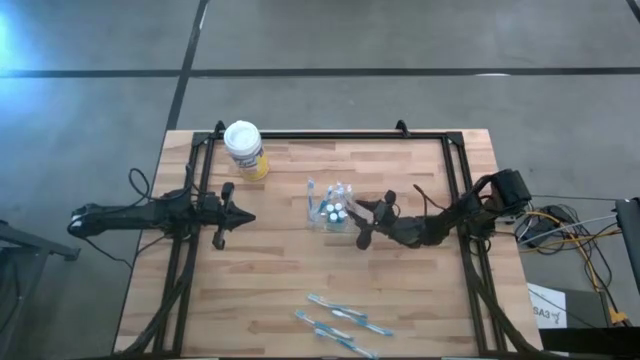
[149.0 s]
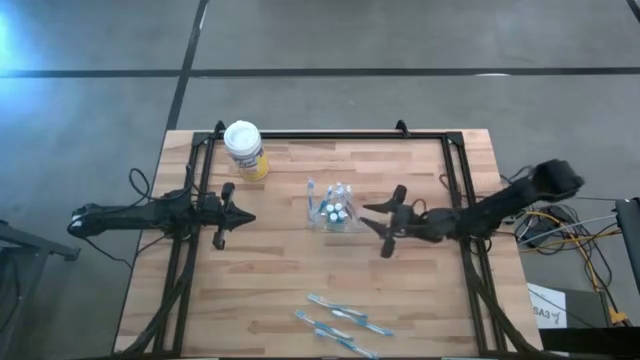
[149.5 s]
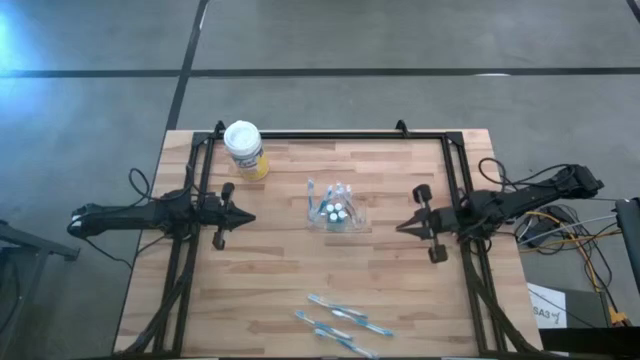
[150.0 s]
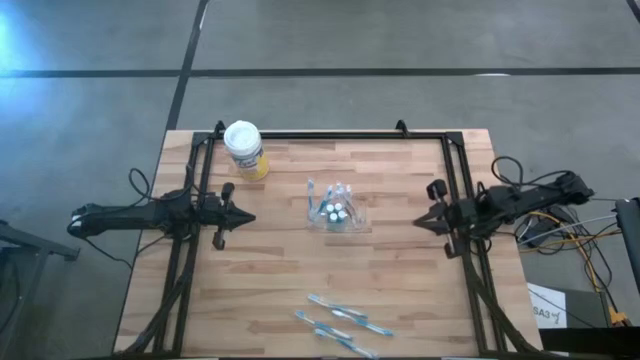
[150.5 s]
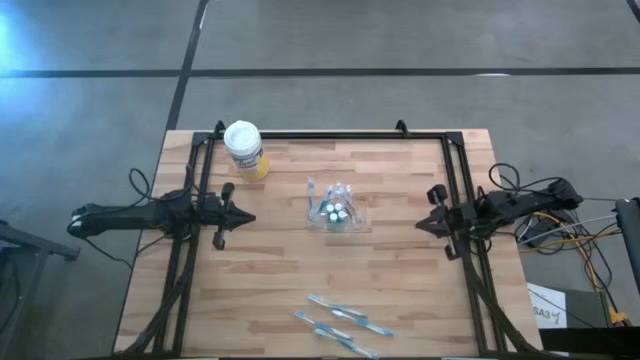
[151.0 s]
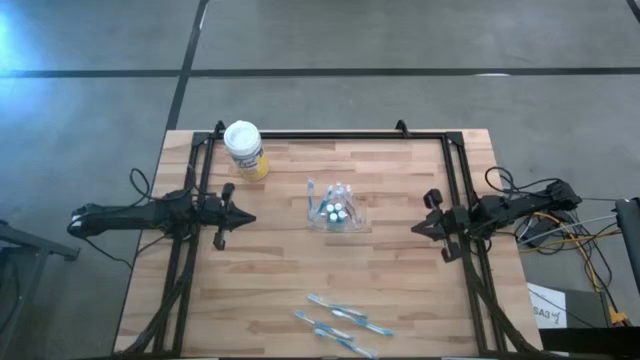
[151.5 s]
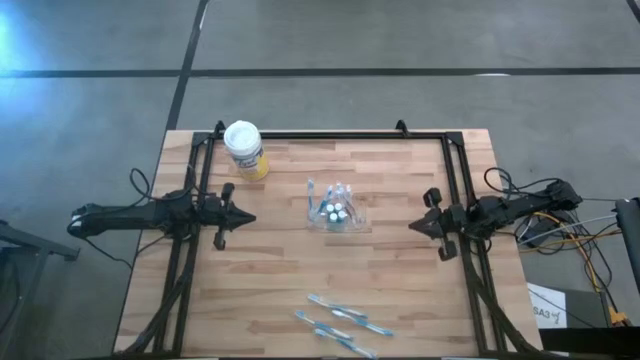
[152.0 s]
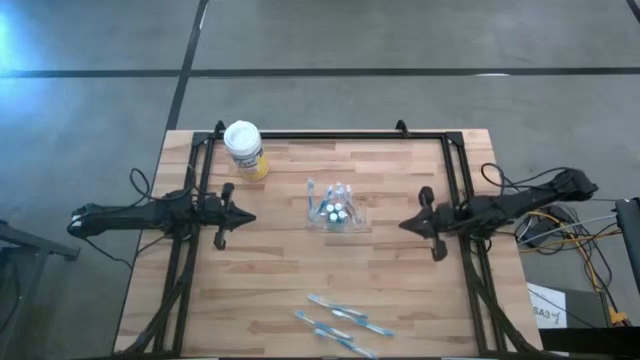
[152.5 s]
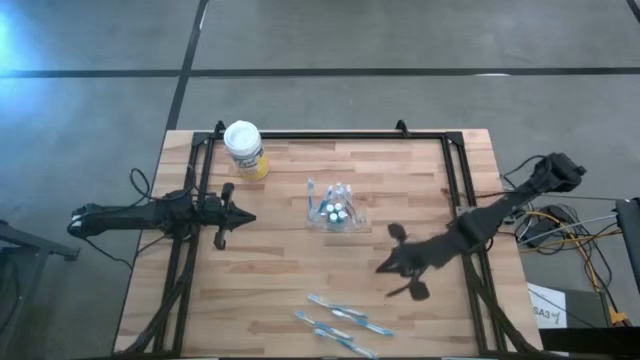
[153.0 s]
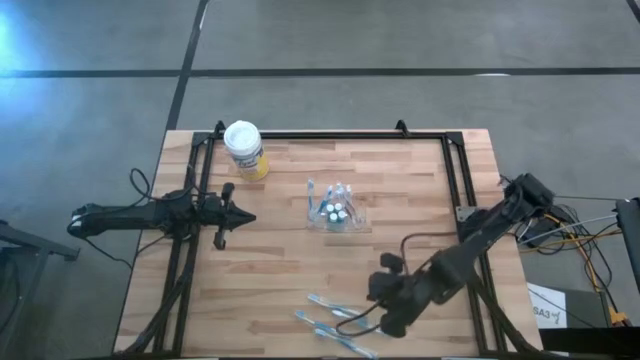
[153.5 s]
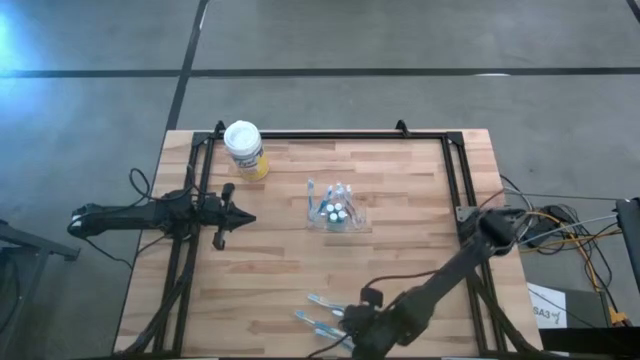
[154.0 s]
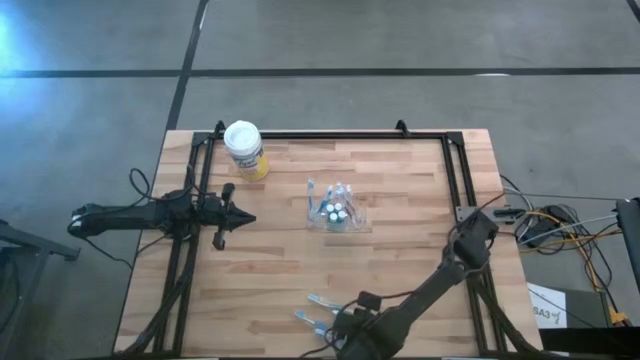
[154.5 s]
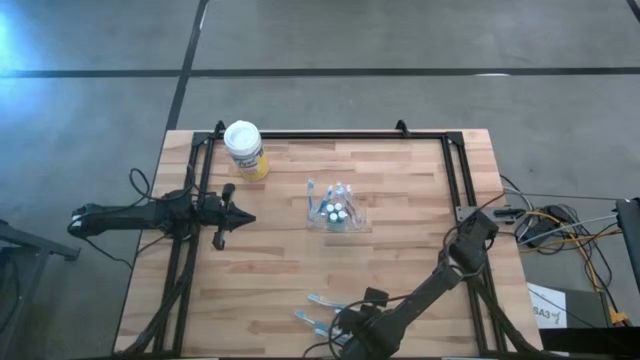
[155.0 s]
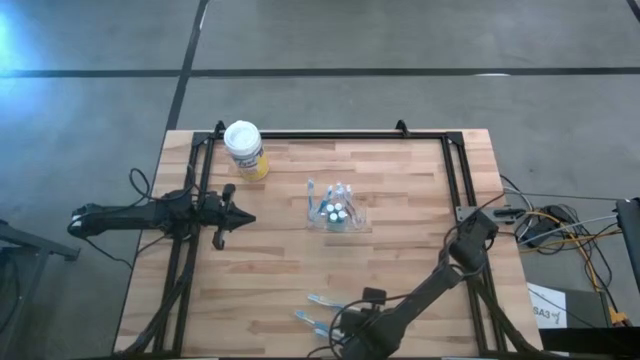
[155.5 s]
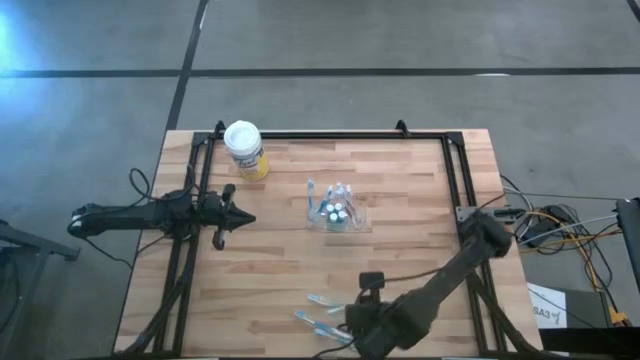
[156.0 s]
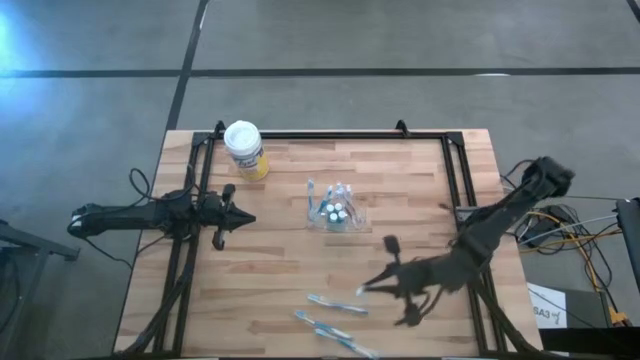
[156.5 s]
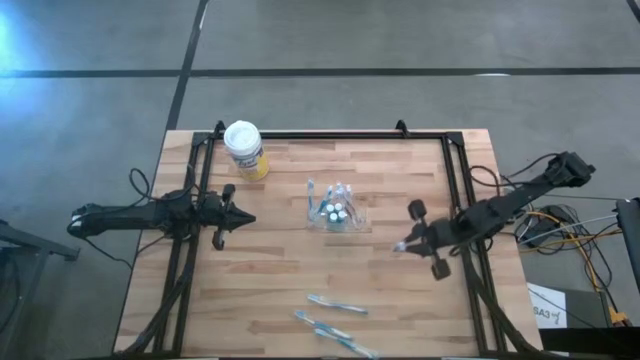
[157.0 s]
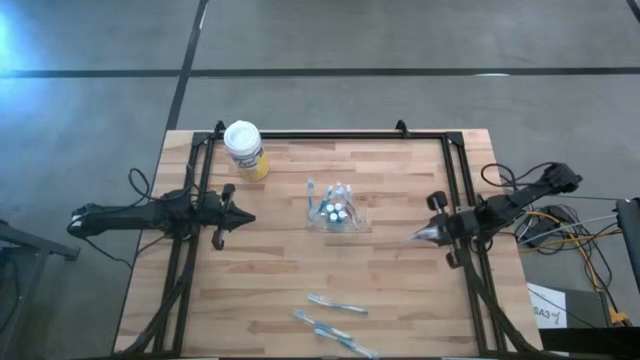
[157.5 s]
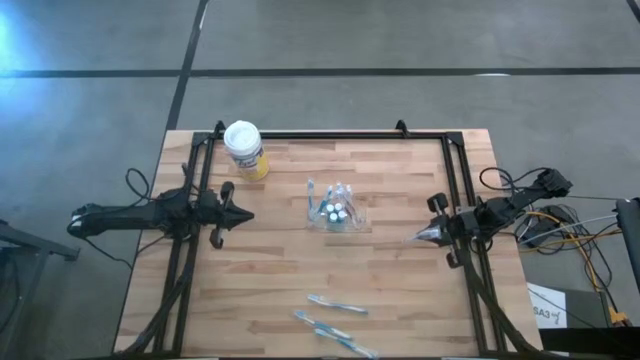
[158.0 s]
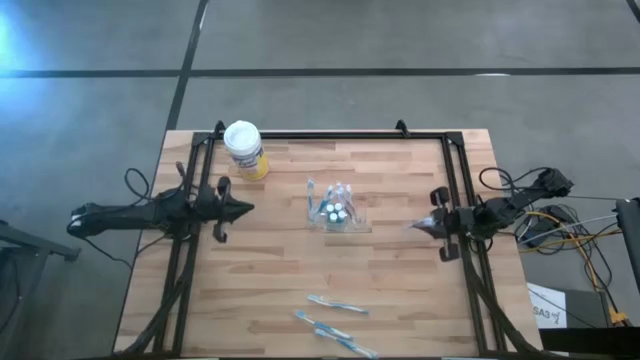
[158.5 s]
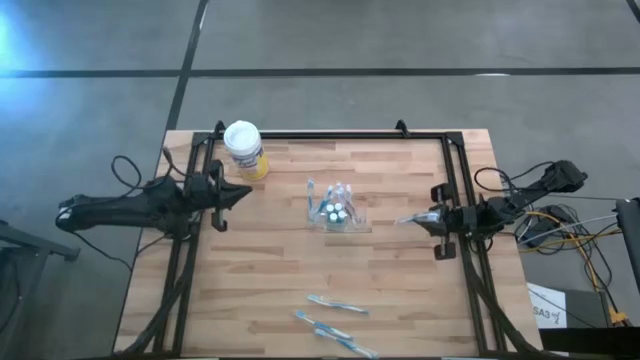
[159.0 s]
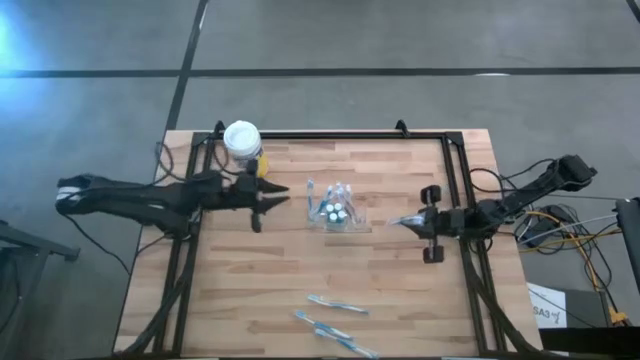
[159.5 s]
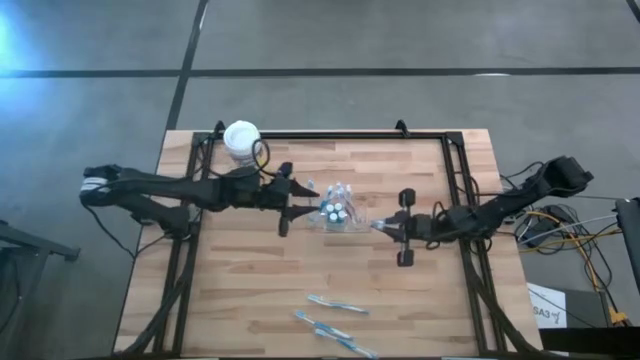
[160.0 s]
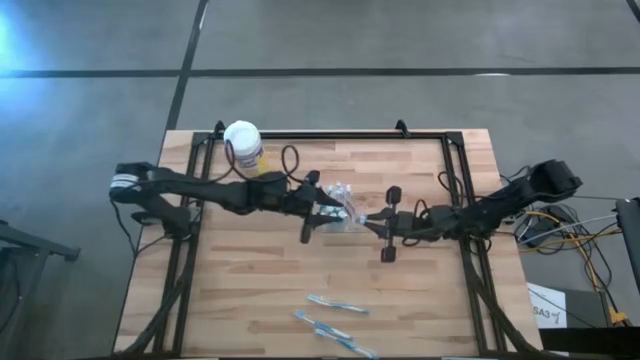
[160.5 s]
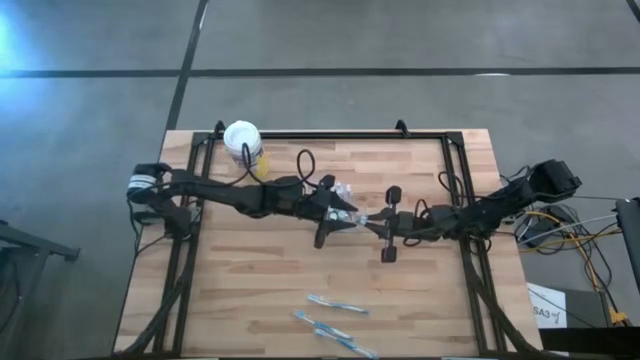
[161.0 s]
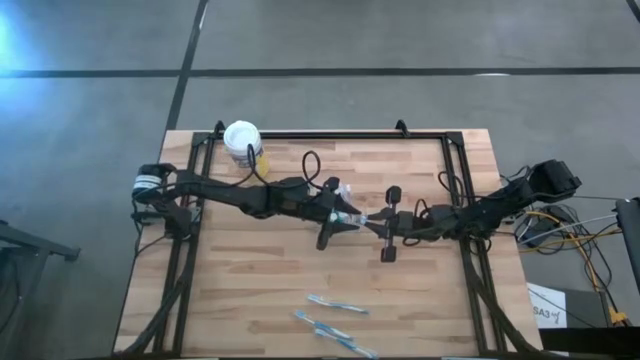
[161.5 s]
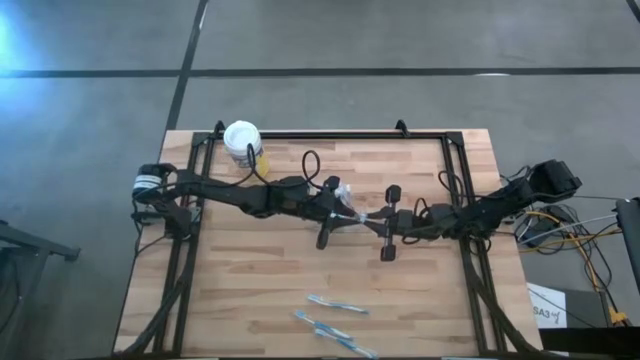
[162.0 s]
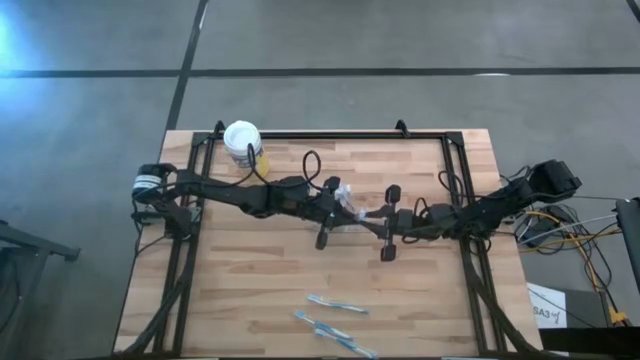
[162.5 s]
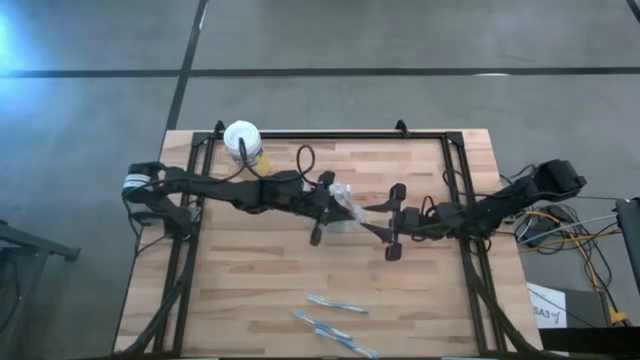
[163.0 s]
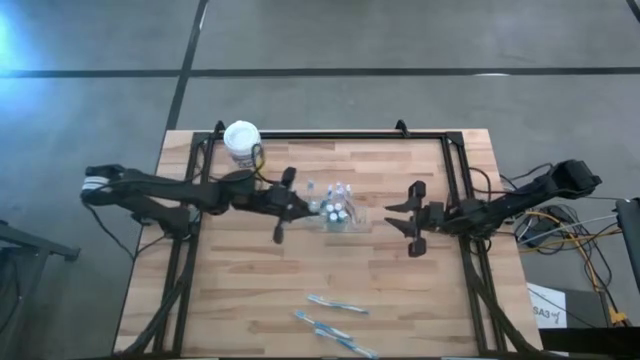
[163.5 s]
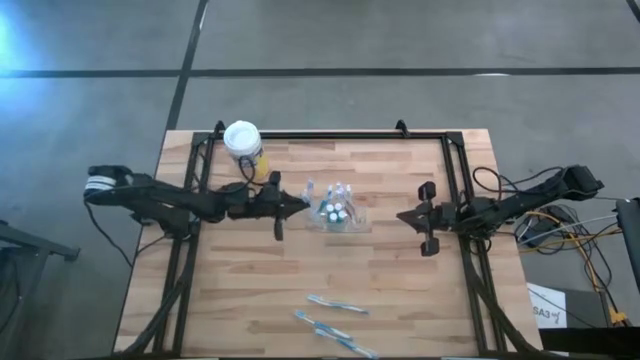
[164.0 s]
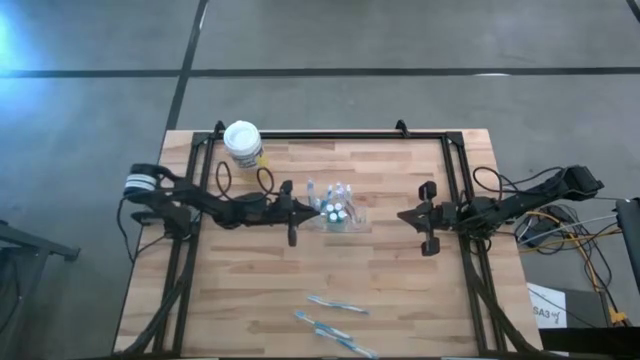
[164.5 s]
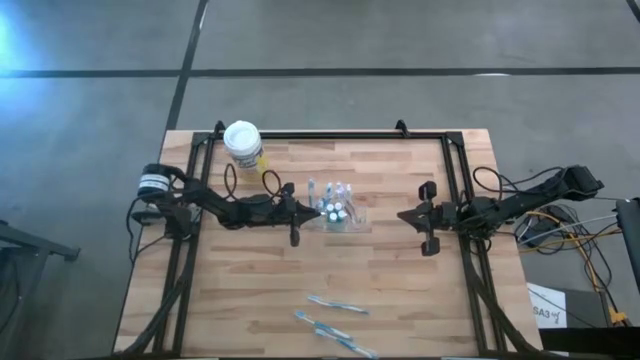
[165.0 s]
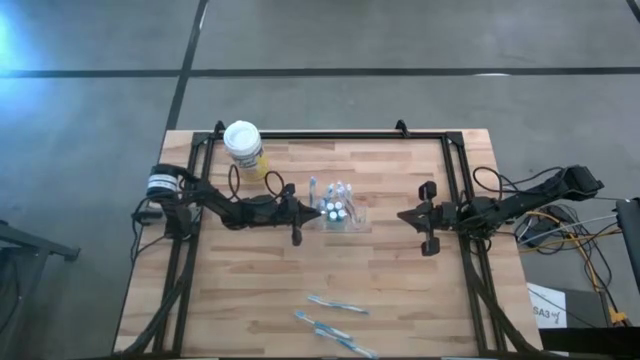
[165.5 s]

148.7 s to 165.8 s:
Task: Pick & Place toothbrushing station
Put the blue toothbrush into the left compartment of the transparent organizer

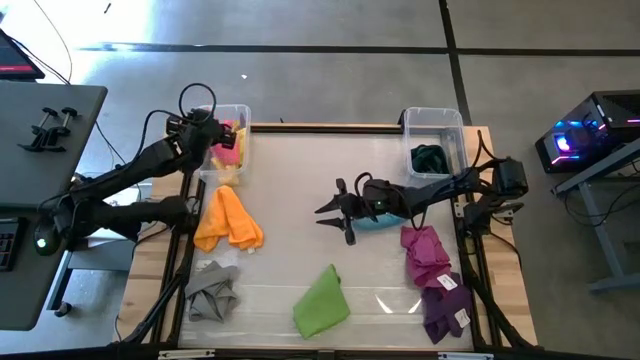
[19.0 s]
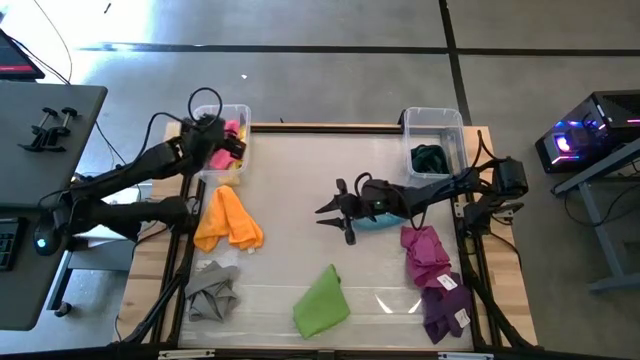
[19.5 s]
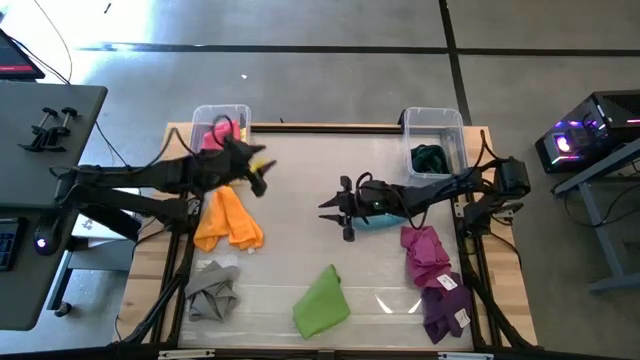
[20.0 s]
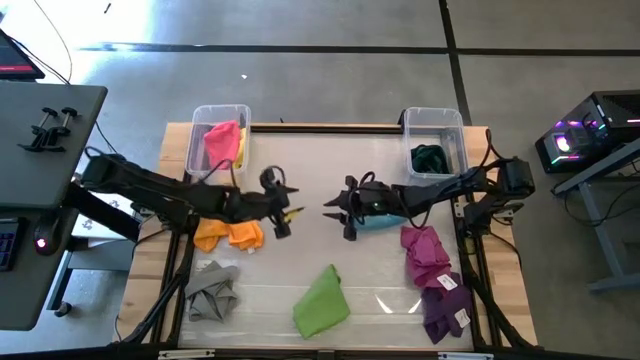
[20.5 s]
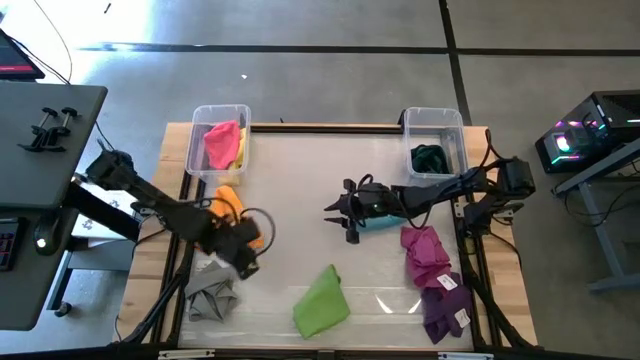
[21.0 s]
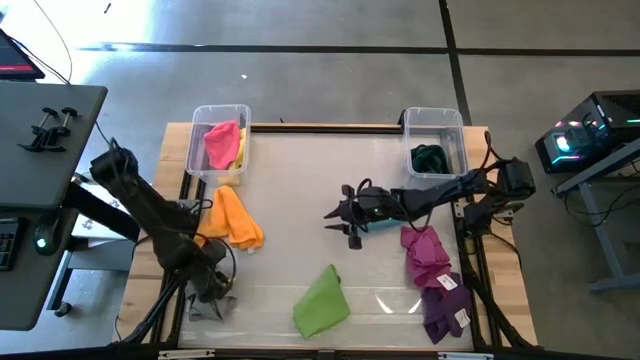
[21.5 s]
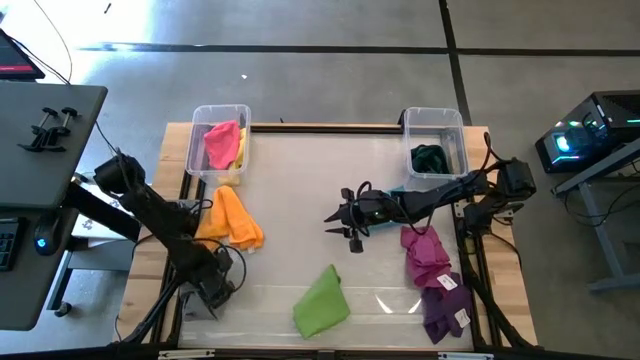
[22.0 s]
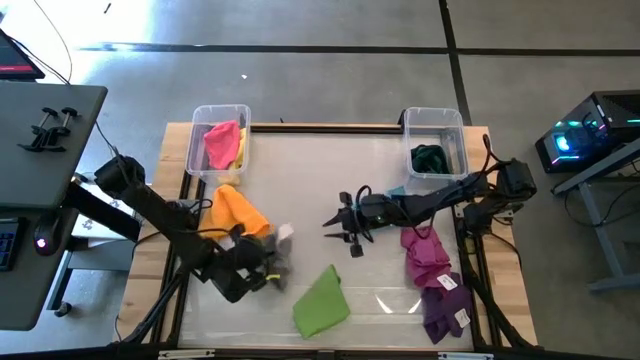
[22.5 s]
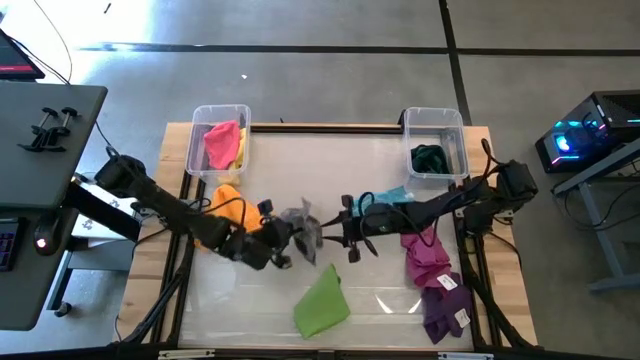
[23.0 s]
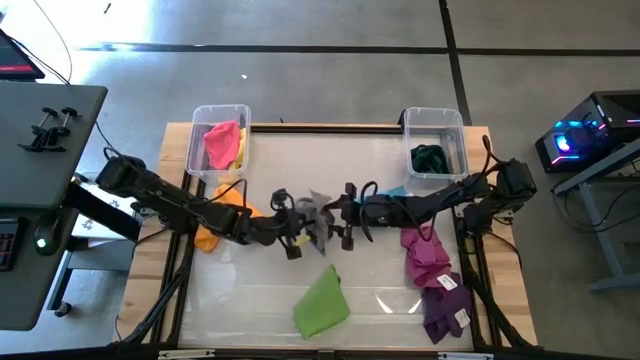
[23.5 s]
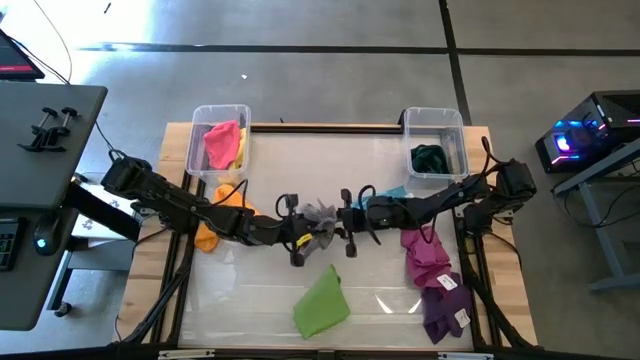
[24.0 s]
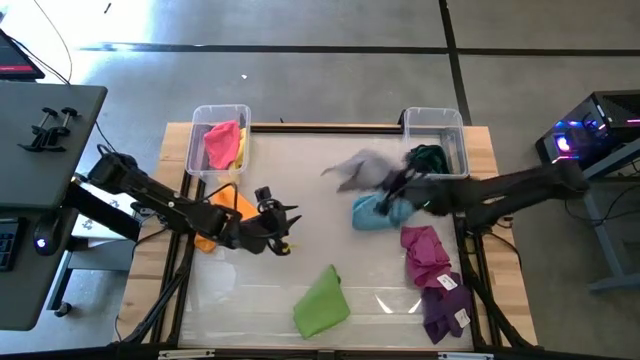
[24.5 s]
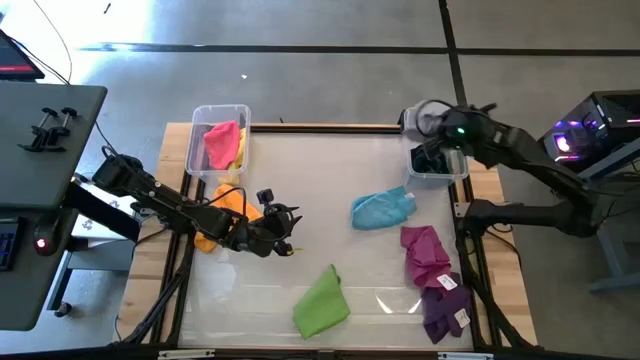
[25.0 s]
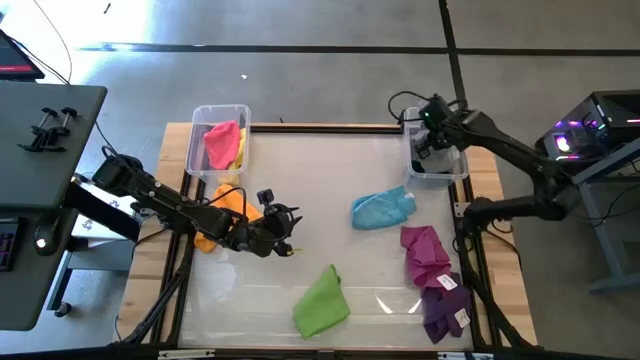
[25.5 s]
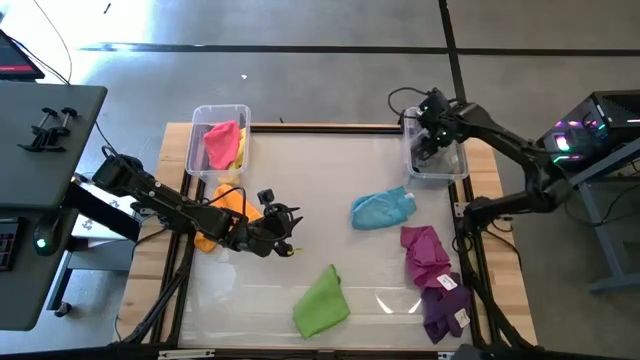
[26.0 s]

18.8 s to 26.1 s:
Task: Sort towels by color in basket
Put the gray towel into the right transparent bin
